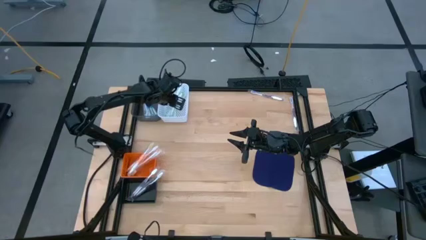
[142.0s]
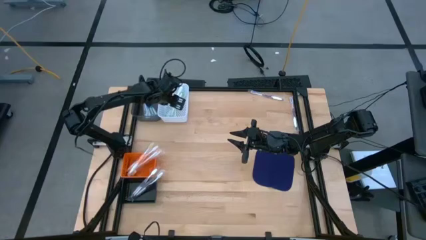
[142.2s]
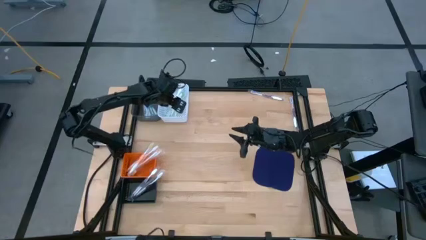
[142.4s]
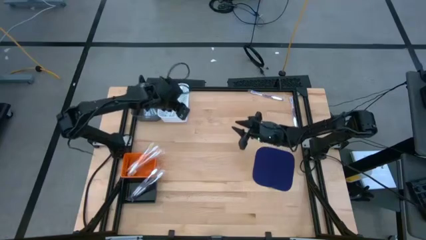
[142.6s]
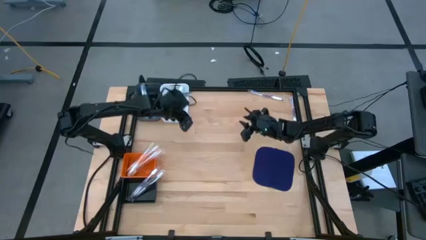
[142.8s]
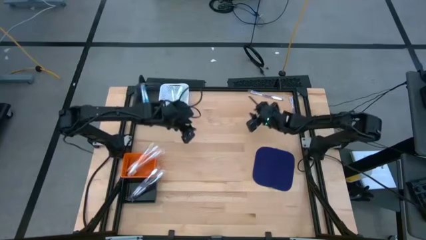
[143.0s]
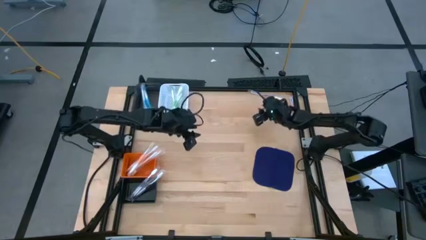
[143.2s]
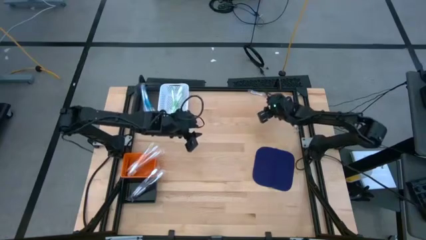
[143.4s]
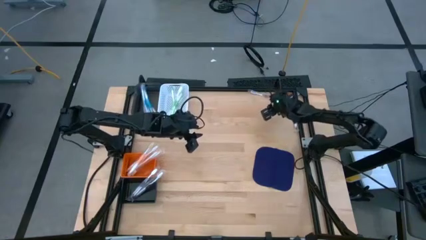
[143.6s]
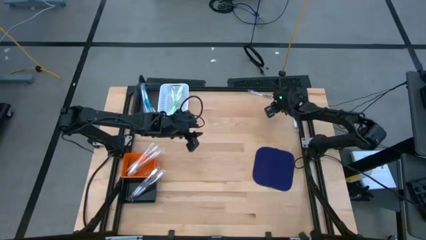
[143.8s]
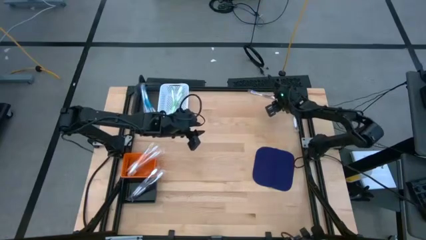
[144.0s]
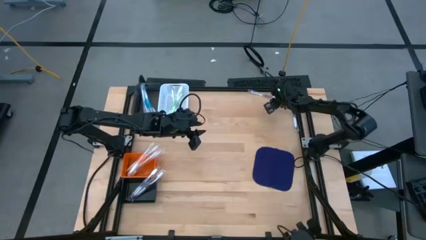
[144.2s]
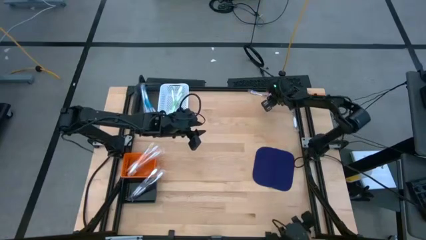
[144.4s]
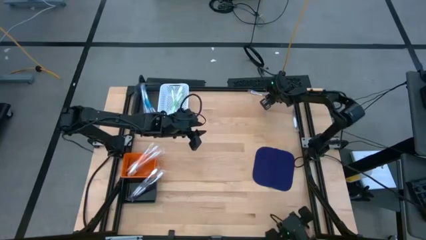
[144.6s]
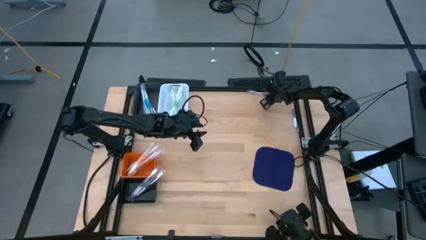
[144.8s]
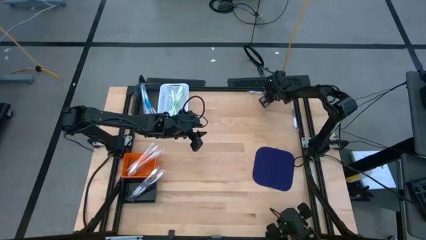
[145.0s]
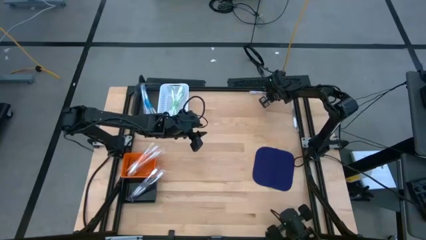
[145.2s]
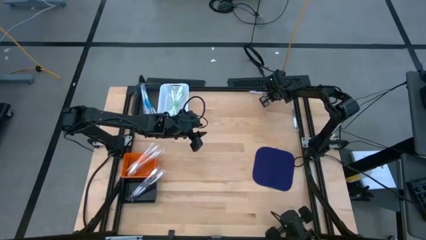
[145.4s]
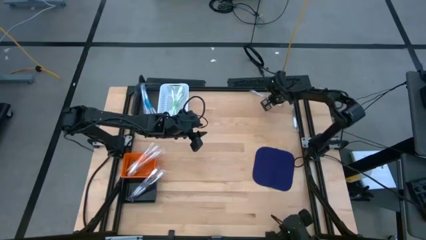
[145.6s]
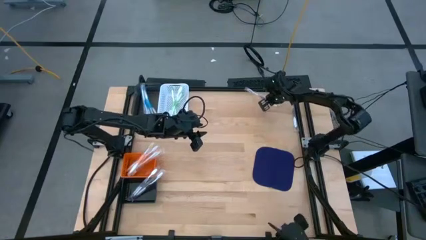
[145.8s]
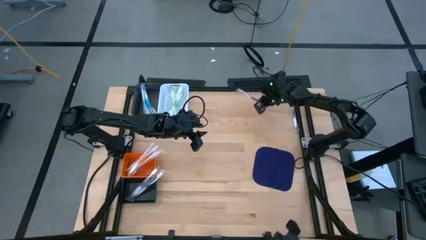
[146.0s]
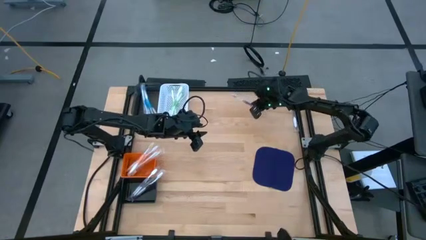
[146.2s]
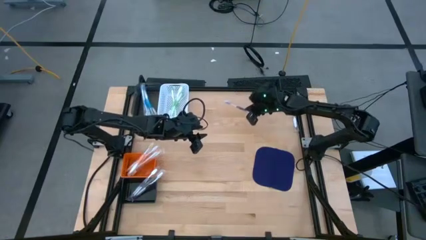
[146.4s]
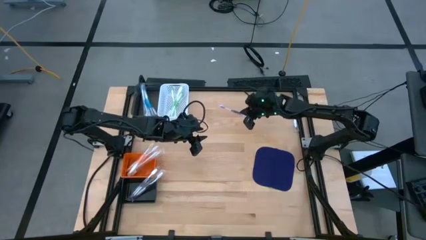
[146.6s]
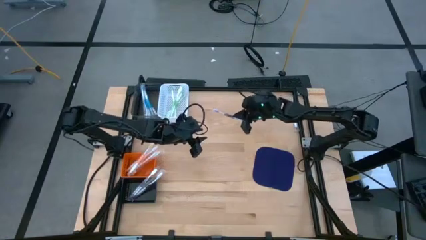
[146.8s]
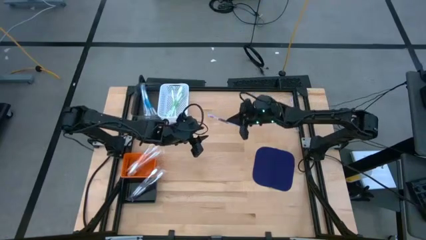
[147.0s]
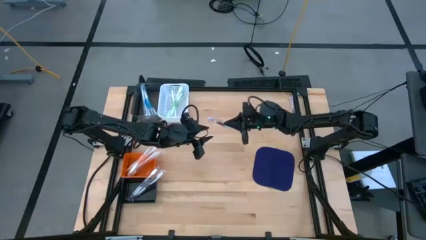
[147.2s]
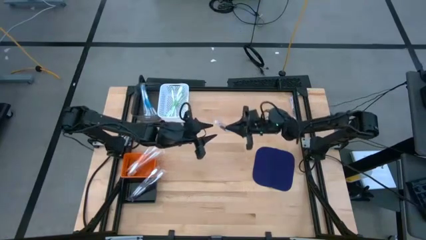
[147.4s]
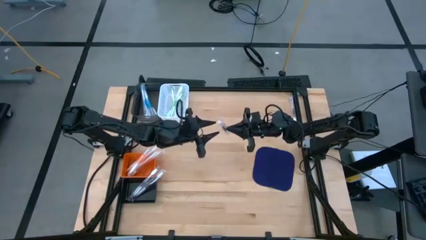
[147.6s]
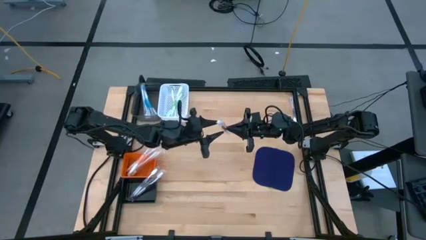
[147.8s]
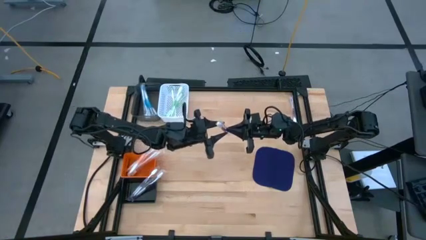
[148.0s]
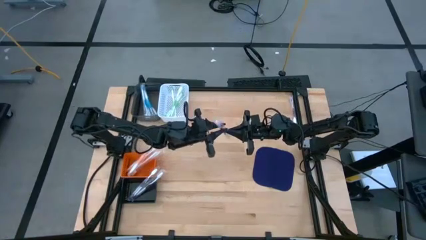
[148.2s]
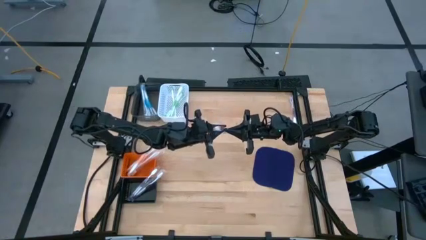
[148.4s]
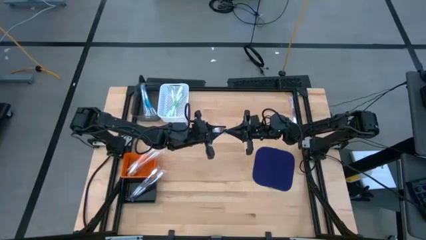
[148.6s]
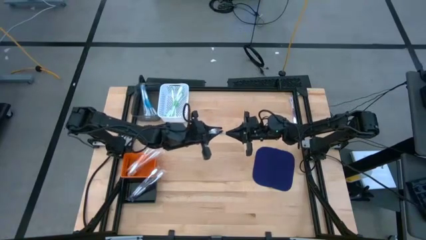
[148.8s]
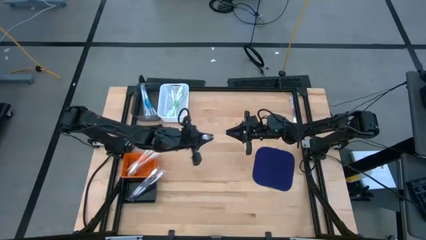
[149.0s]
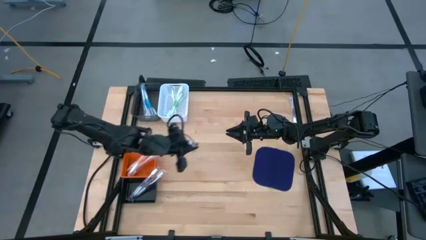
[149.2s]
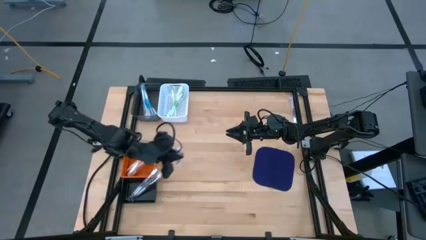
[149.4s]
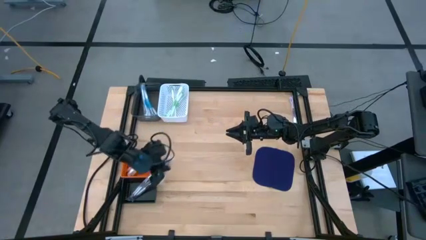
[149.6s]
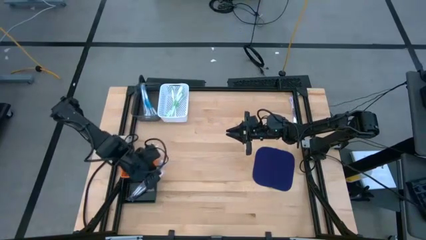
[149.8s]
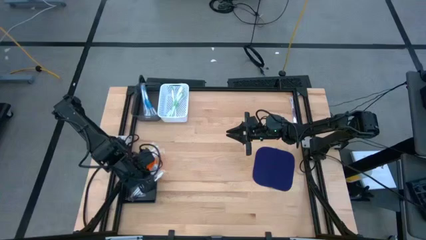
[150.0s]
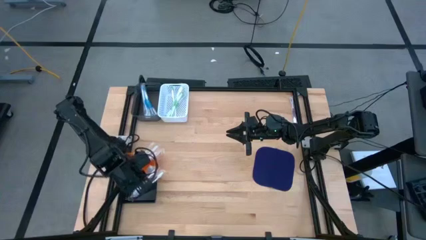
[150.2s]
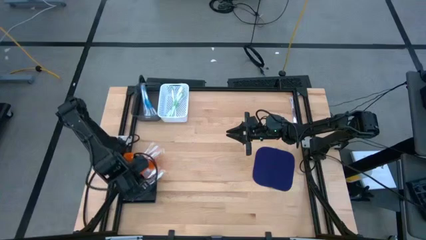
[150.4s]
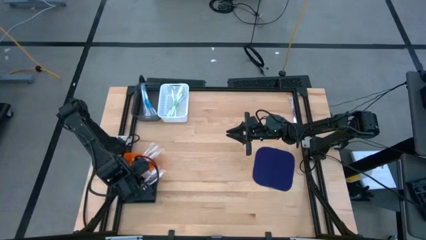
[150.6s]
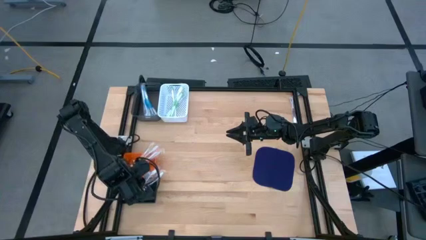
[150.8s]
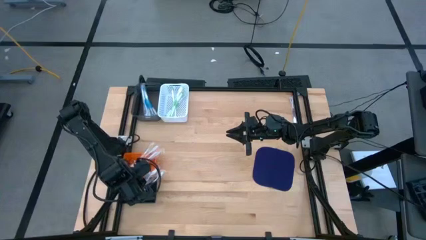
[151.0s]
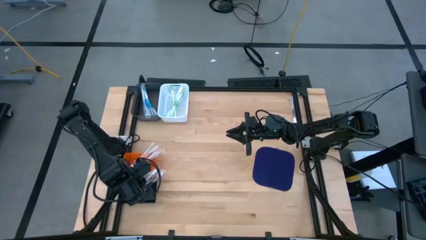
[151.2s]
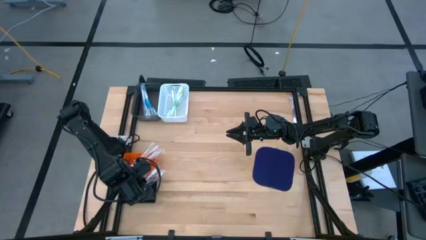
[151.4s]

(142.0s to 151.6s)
Task: Pick & Place Toothbrushes
Put the violet toothbrush into the black bin

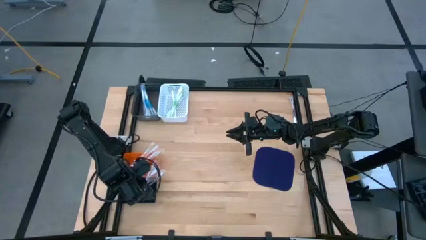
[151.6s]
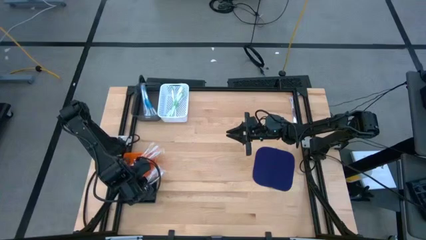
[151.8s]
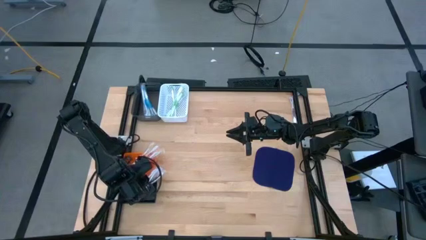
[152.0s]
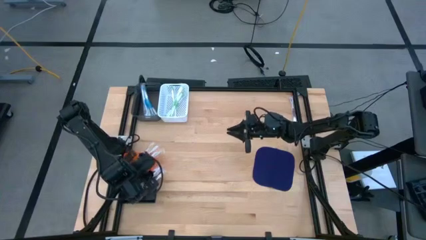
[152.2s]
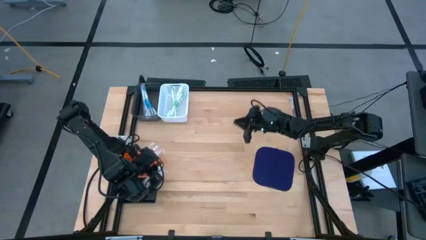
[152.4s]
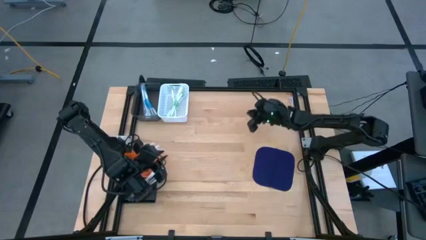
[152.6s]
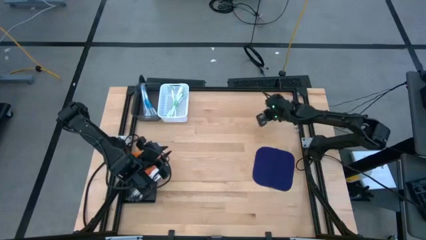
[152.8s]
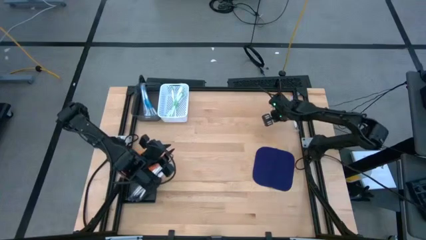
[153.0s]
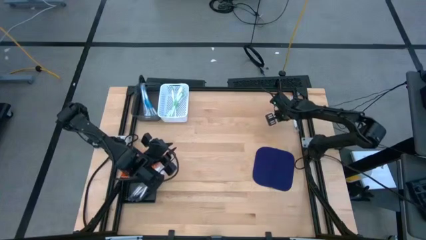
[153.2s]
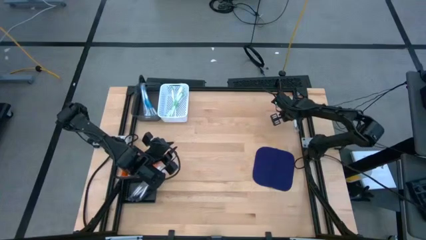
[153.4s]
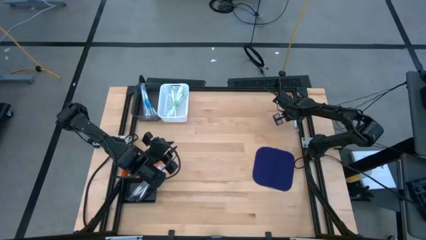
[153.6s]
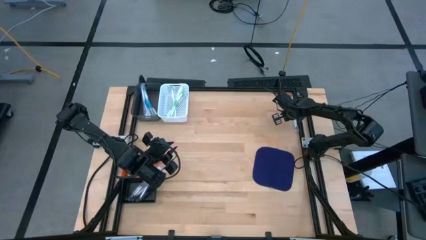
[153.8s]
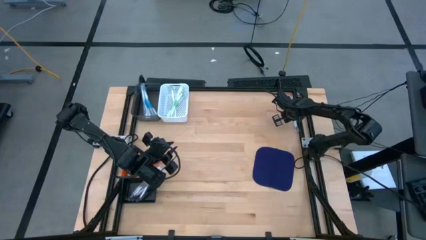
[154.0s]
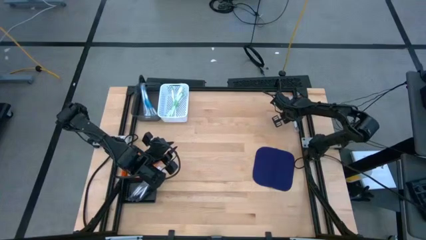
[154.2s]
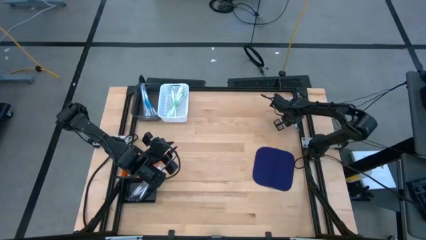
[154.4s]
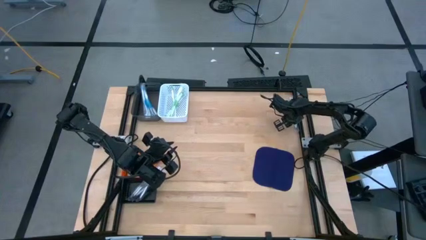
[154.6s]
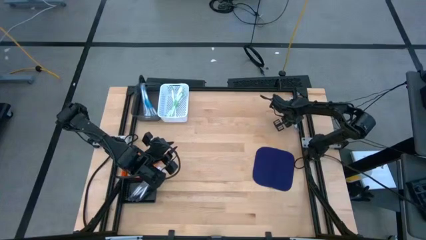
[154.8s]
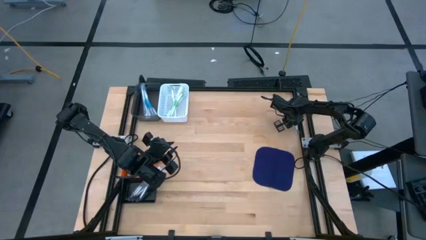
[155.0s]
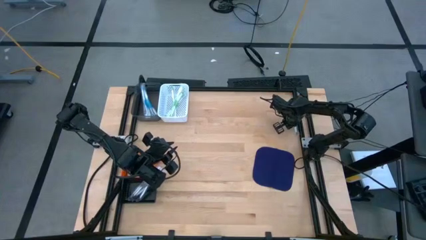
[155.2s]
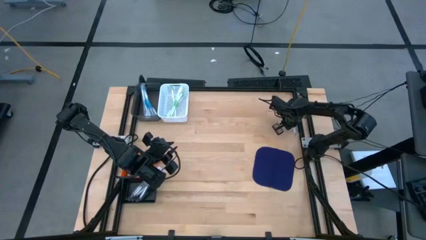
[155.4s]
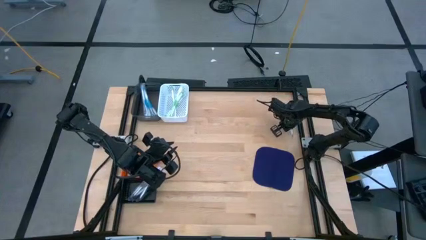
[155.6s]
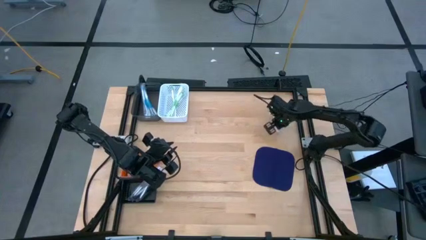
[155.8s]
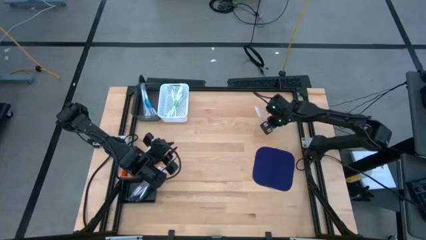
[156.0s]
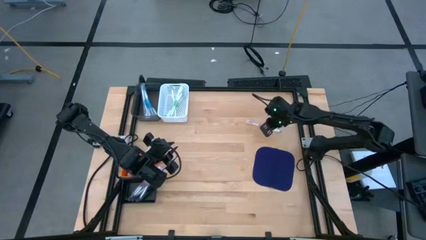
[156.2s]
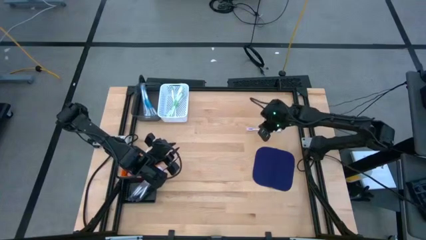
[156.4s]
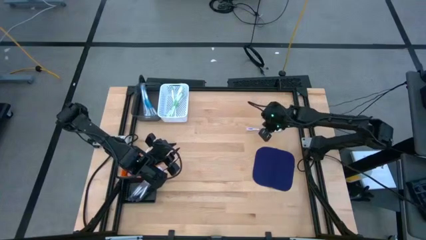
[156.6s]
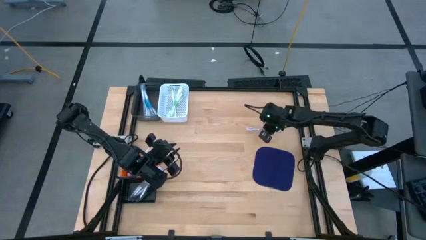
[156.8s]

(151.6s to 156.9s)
Put the violet toothbrush into the black bin

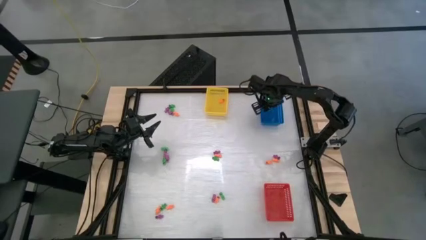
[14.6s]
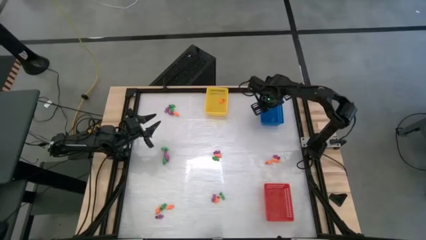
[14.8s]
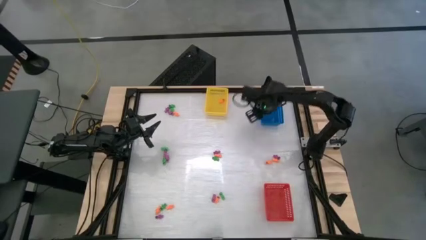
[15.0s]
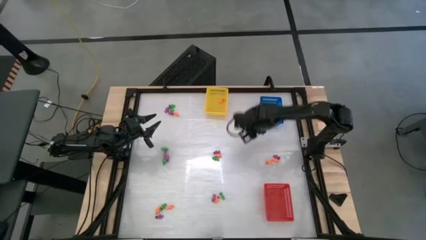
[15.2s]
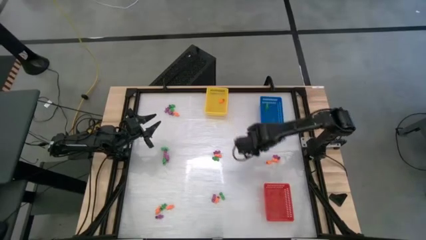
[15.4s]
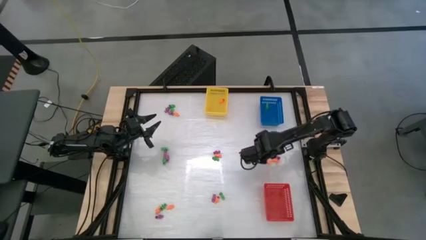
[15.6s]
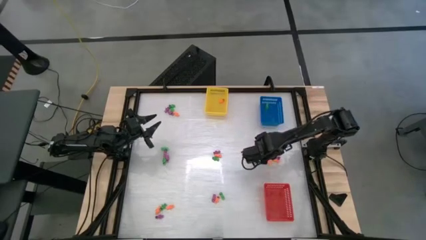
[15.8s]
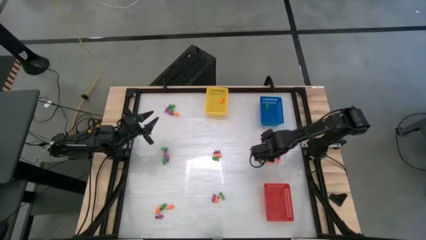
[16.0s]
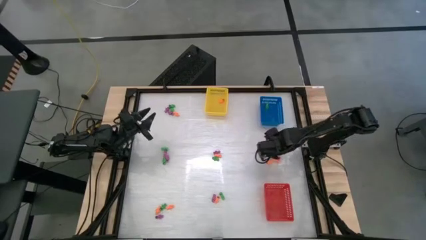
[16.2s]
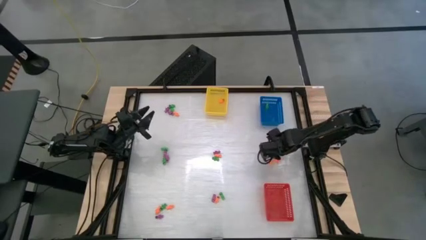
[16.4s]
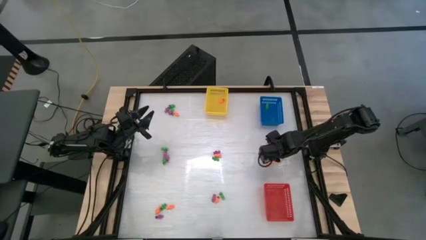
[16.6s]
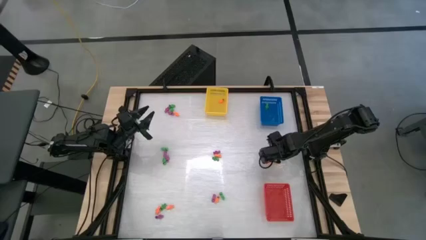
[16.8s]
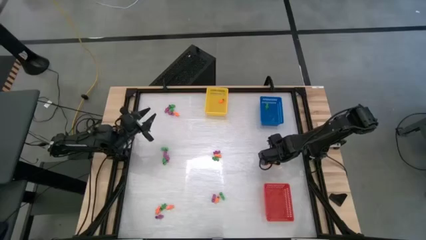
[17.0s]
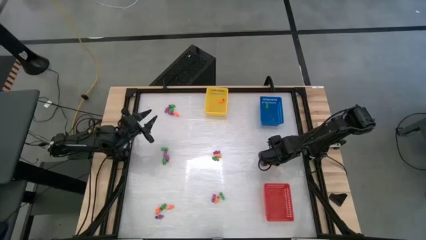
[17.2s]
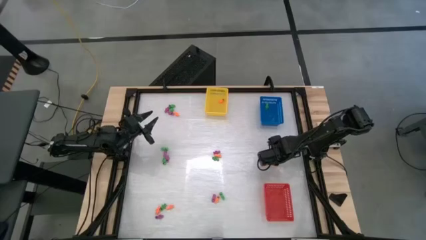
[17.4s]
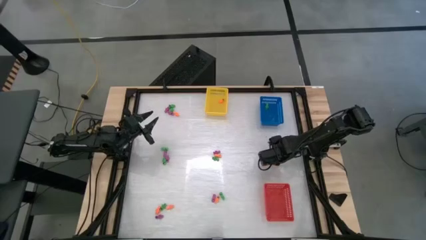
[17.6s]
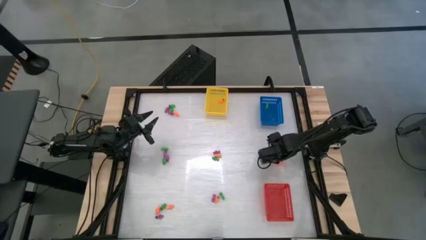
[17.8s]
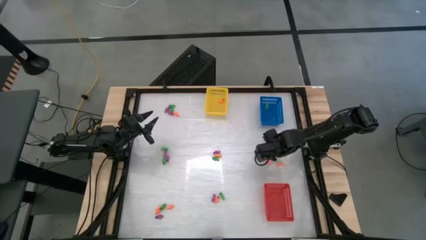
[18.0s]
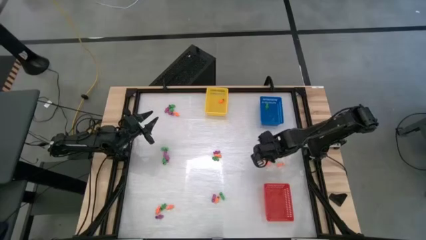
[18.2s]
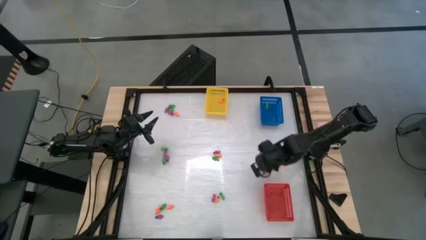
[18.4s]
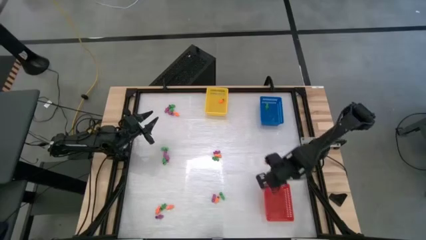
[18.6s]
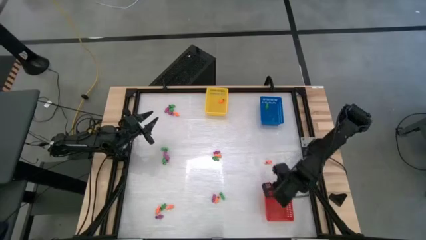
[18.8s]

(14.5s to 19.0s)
Task: Sort Halloween decoration
Put the violet skeleton toy into the red bin
